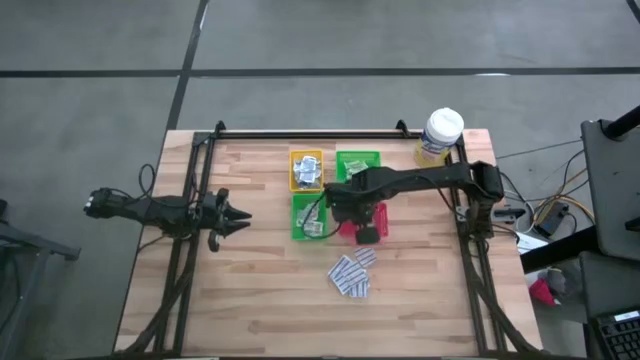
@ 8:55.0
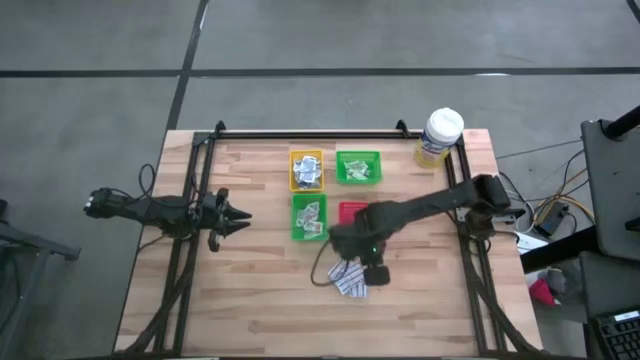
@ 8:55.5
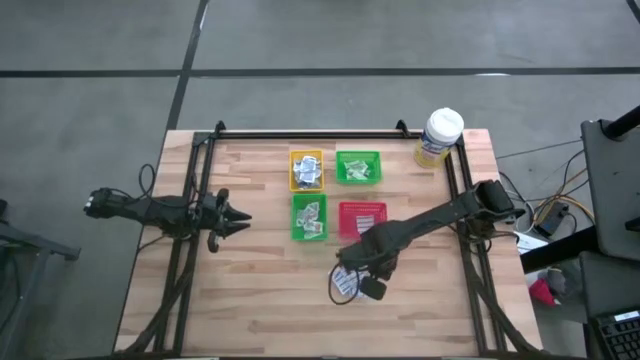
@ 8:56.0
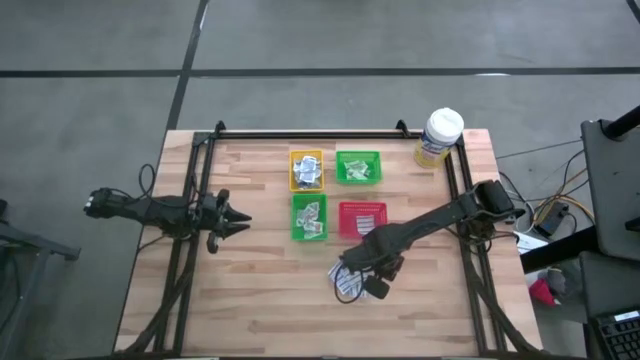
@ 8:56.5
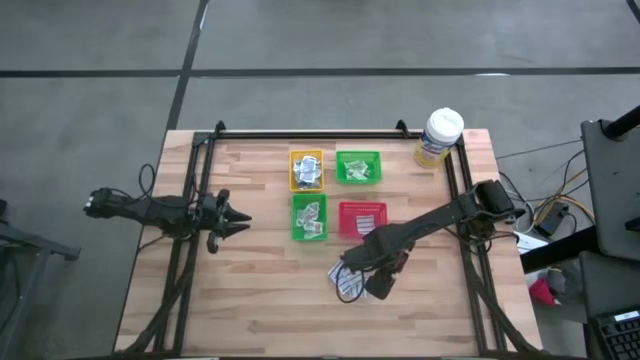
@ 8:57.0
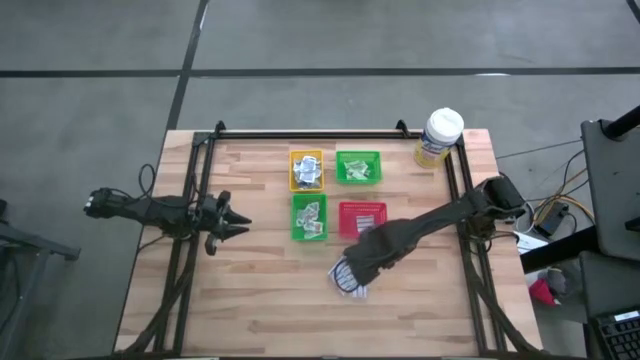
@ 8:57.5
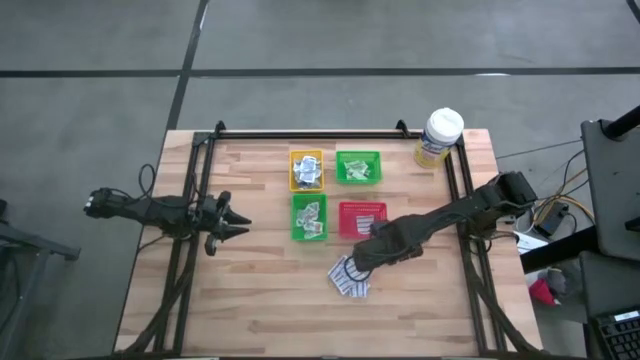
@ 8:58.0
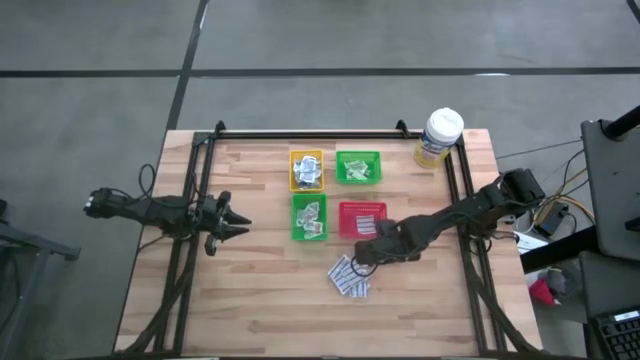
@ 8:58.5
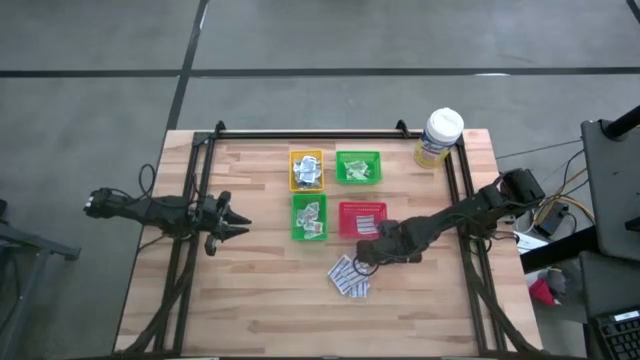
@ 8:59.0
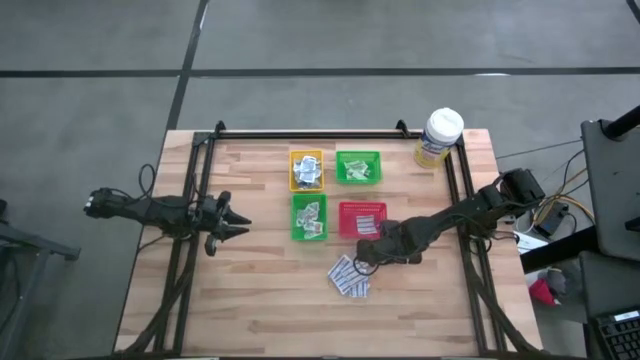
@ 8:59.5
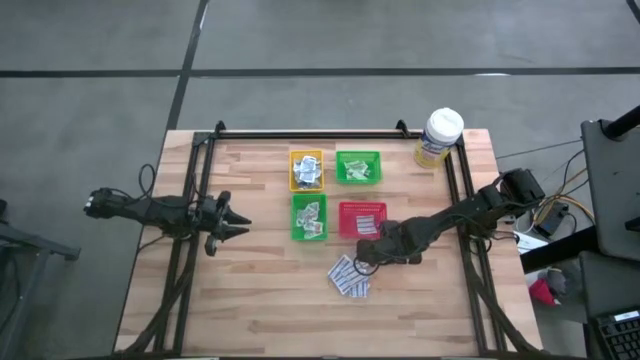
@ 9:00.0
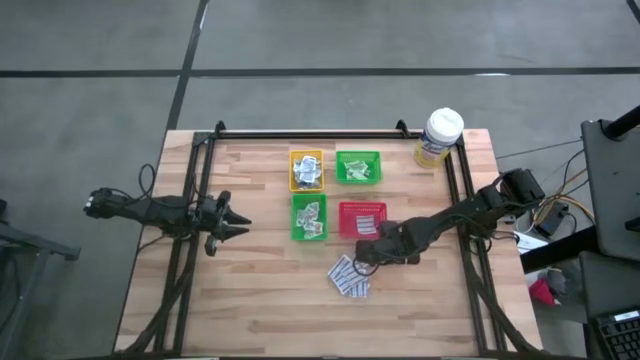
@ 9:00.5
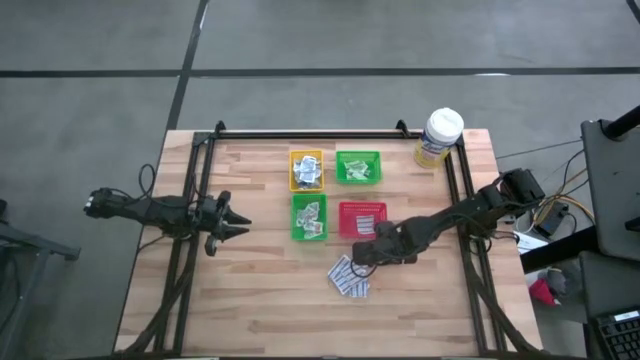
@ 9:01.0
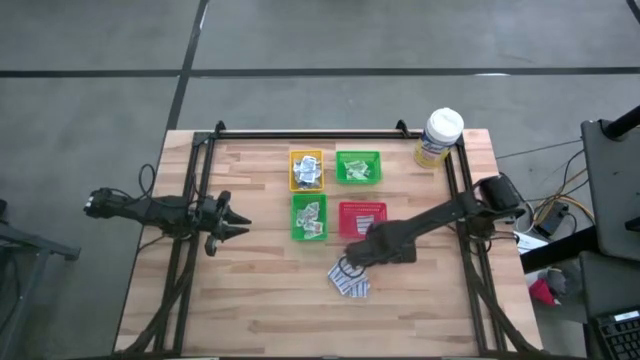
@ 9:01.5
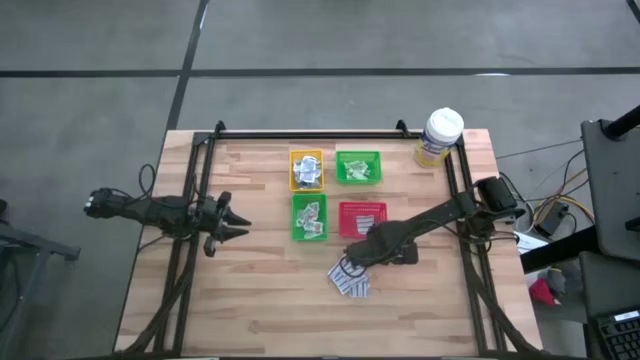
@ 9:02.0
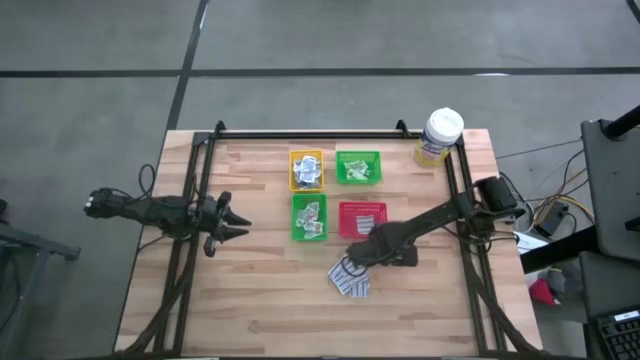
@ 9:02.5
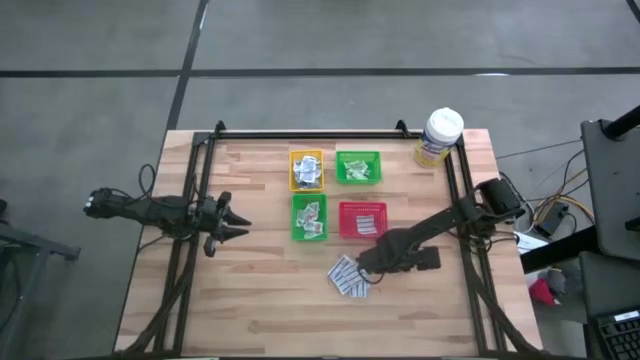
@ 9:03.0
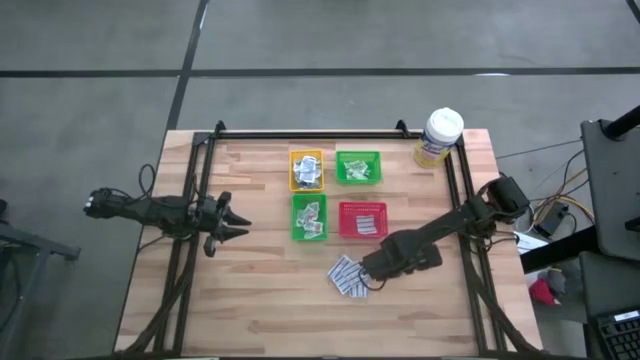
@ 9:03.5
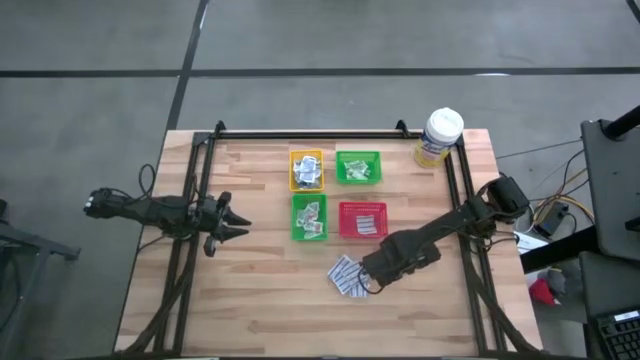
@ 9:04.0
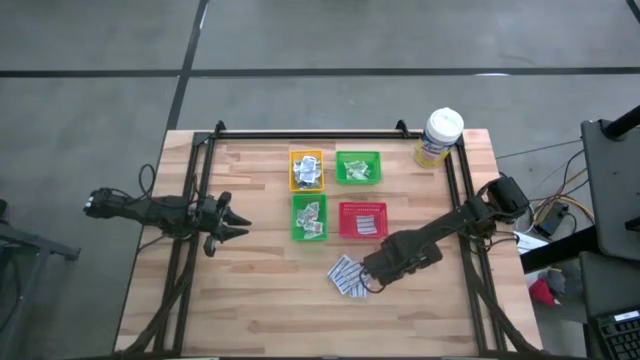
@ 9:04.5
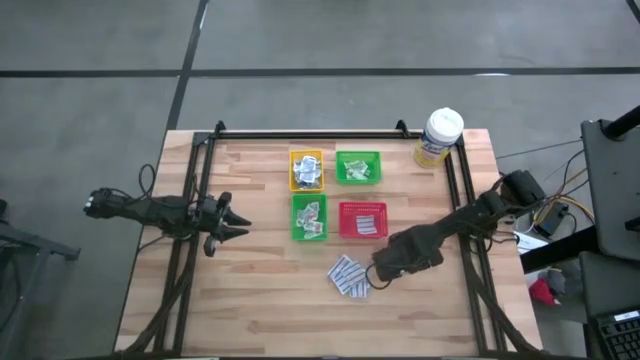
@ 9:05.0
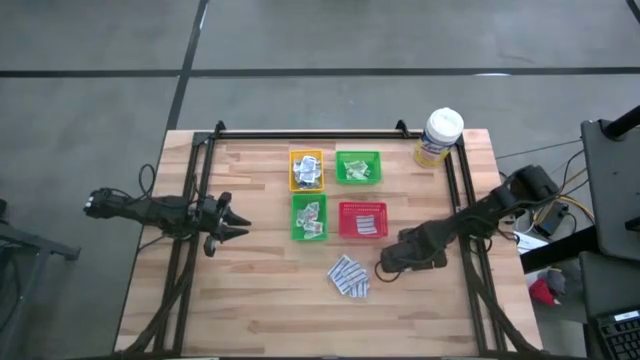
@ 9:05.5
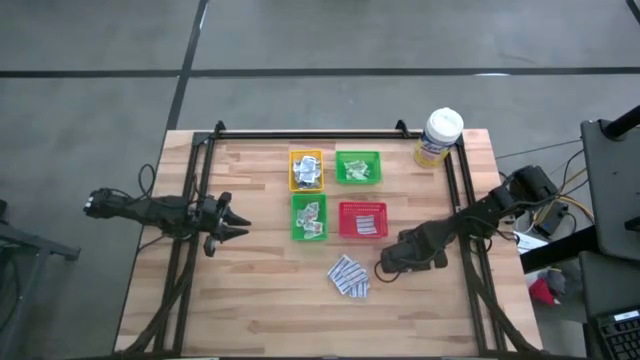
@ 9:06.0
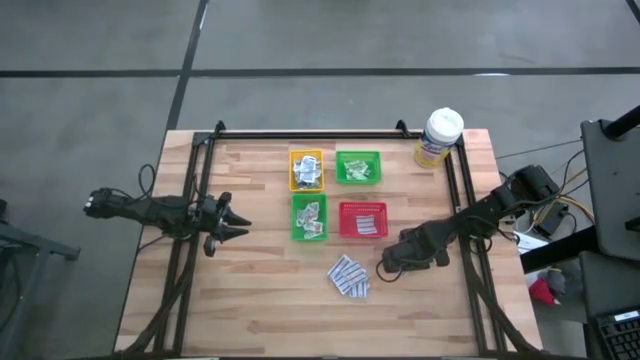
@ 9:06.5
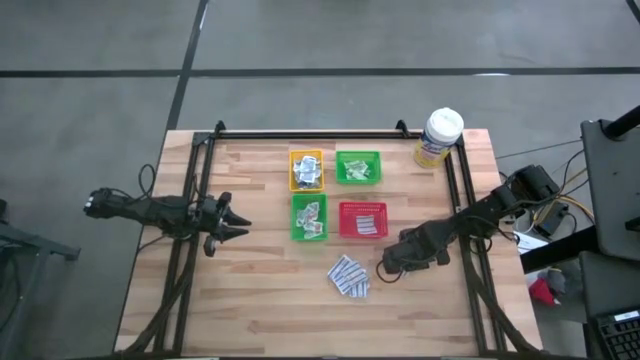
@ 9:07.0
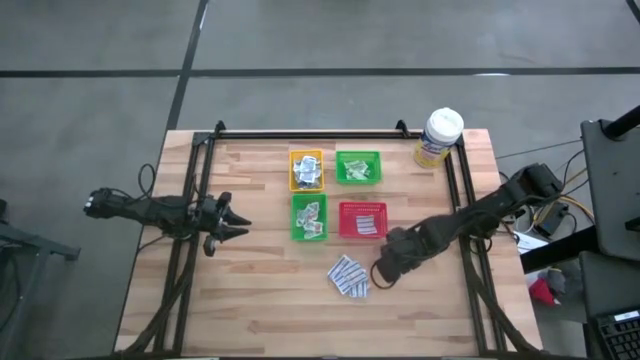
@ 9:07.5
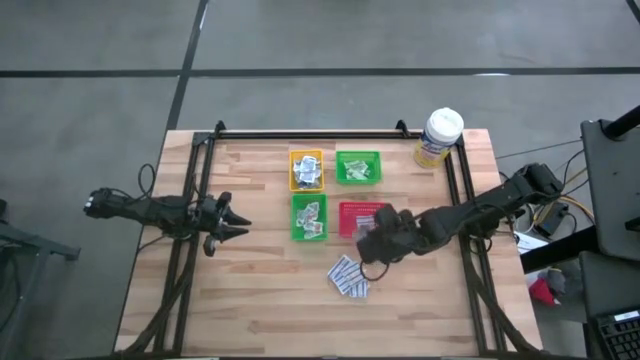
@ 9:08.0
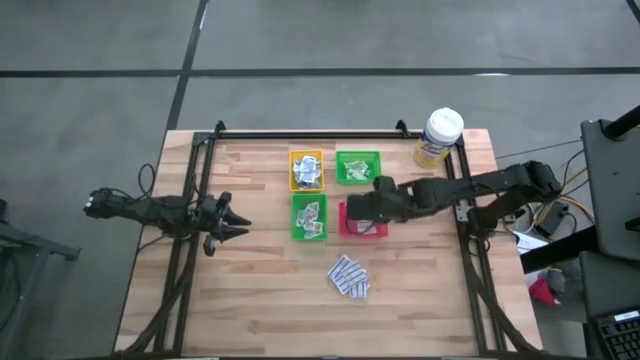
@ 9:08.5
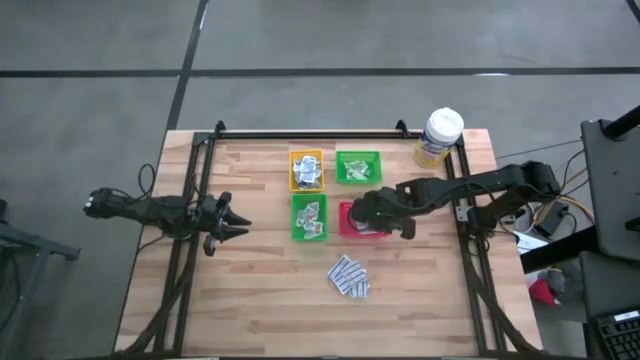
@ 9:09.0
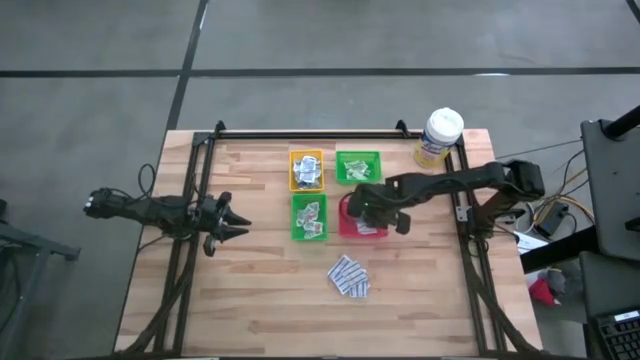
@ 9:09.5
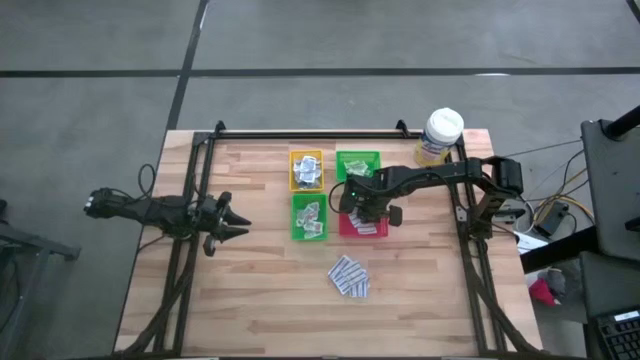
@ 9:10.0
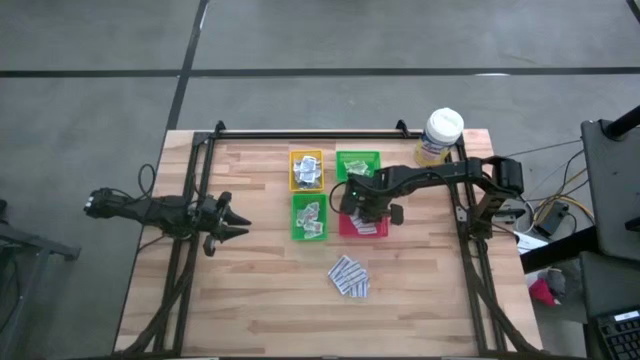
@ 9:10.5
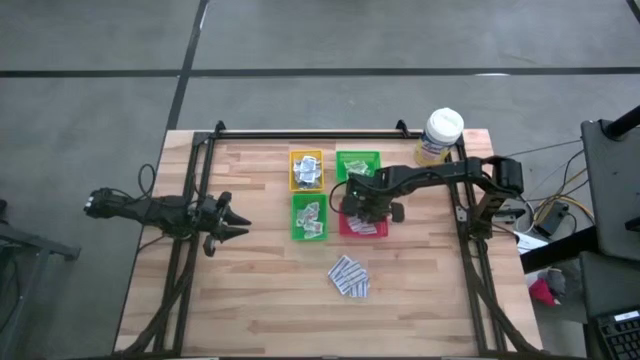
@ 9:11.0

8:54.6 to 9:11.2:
Task: Pick & Place First Aid Supplies
Put the blue bandage pack into the red bin

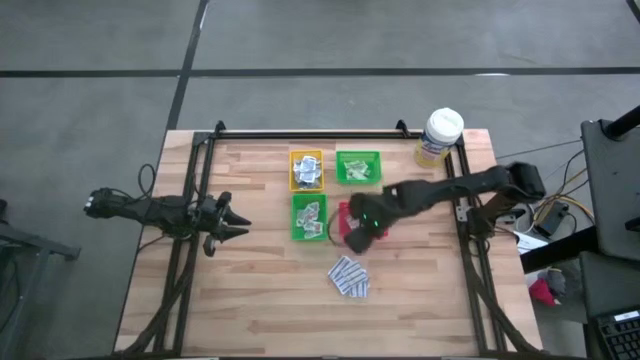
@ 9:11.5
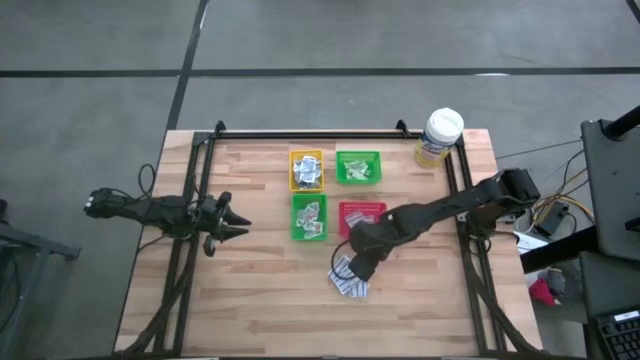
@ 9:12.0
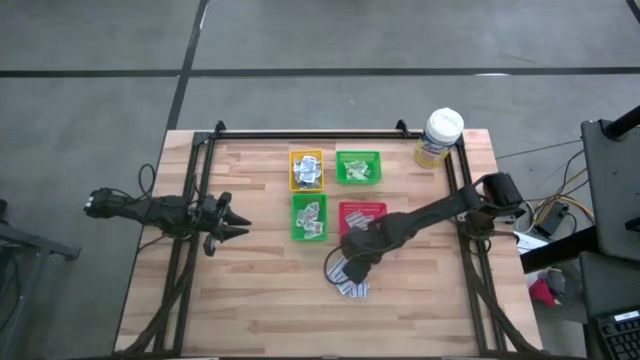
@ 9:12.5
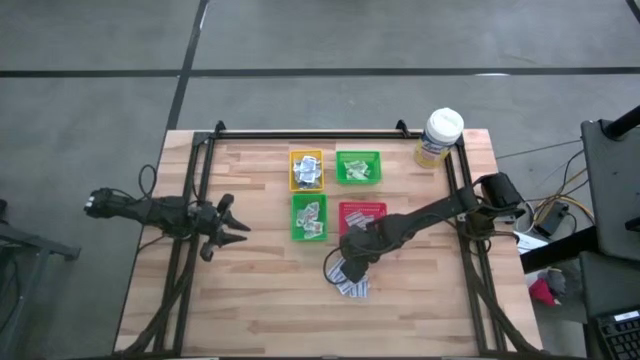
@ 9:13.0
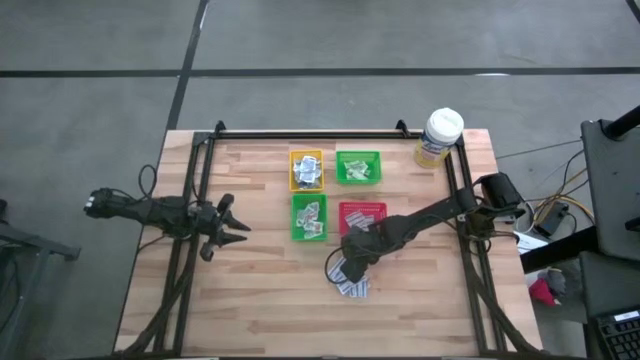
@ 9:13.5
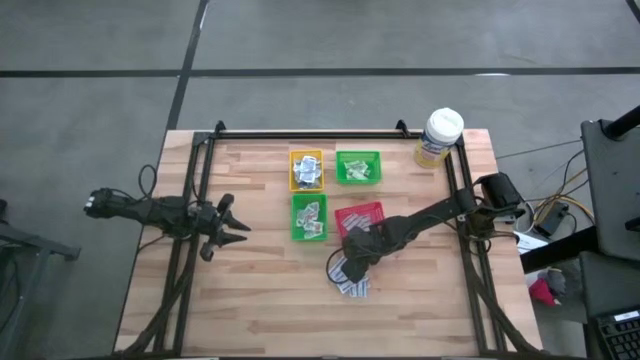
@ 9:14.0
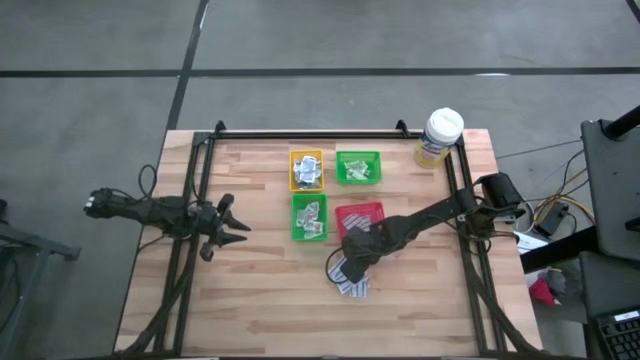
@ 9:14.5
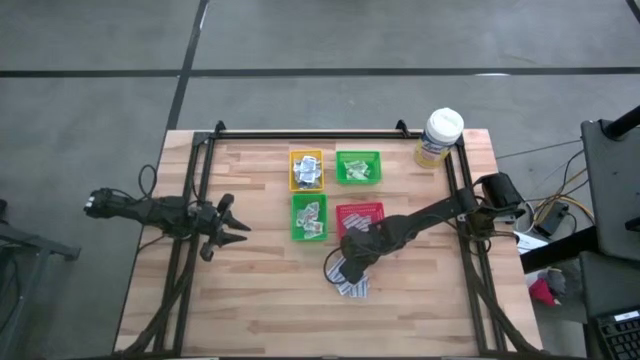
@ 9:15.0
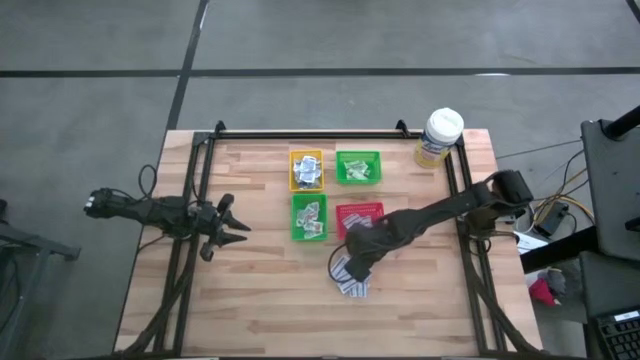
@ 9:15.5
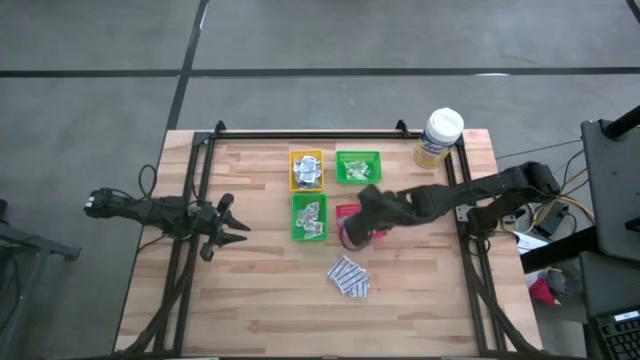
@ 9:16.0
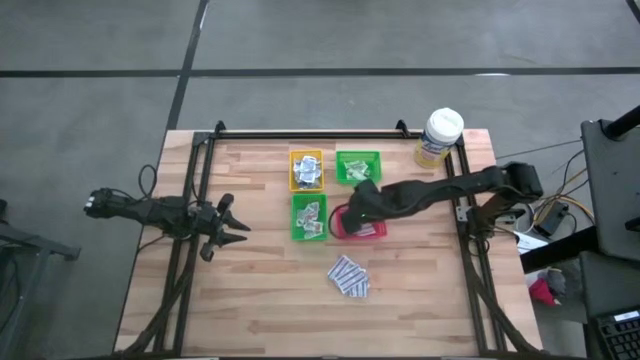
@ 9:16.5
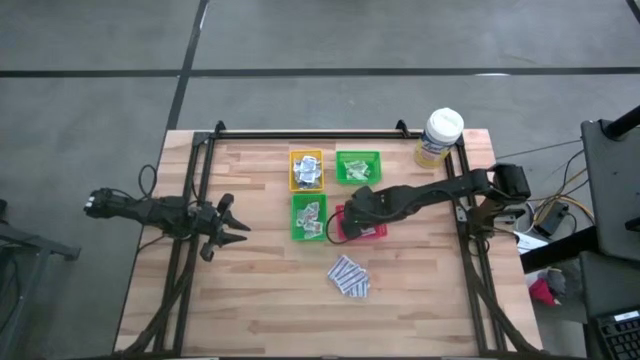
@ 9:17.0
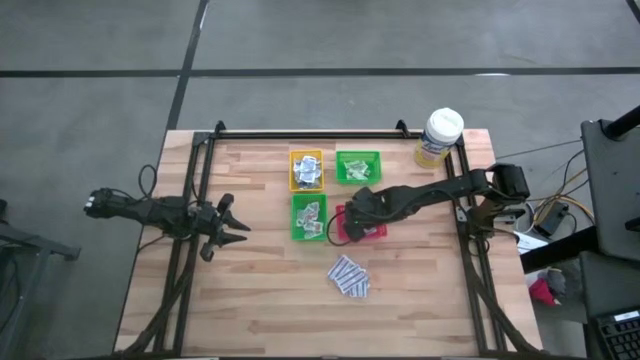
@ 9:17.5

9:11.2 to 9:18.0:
Put the blue bandage pack into the red bin
